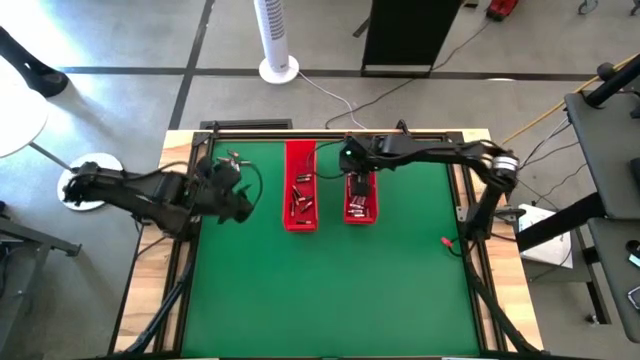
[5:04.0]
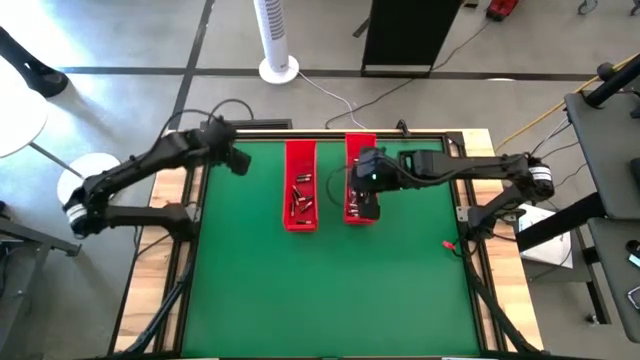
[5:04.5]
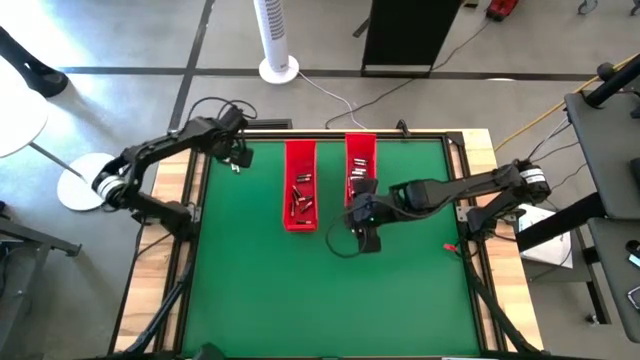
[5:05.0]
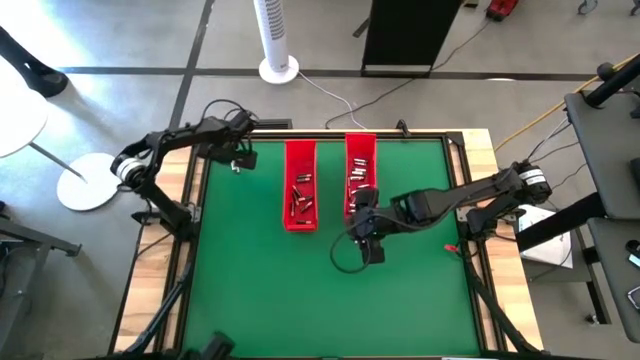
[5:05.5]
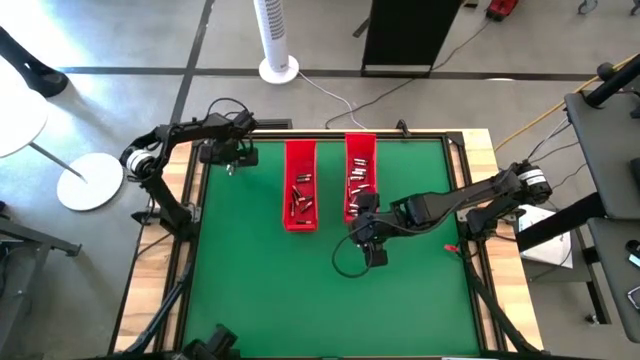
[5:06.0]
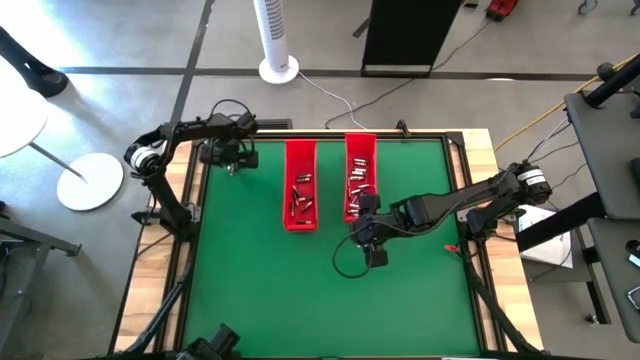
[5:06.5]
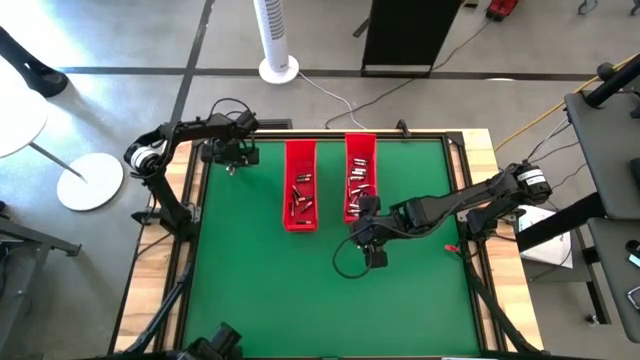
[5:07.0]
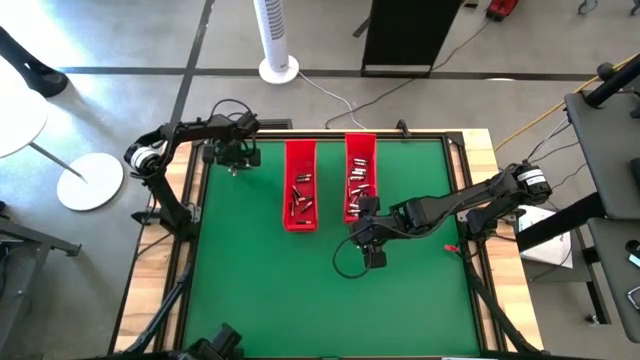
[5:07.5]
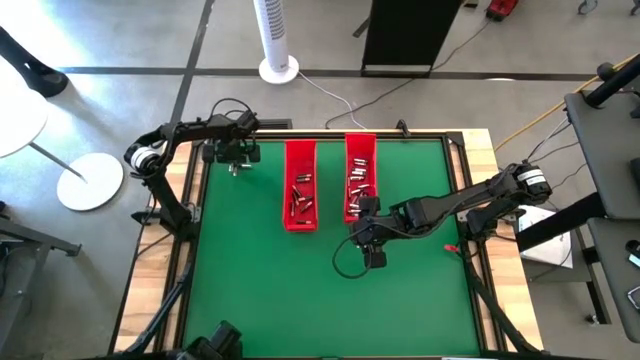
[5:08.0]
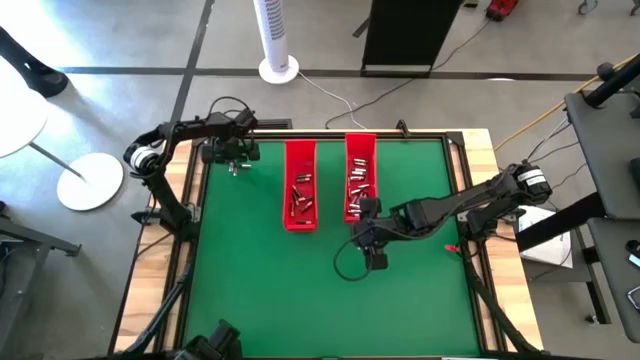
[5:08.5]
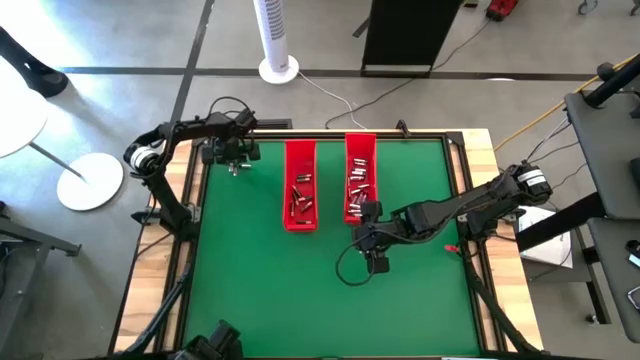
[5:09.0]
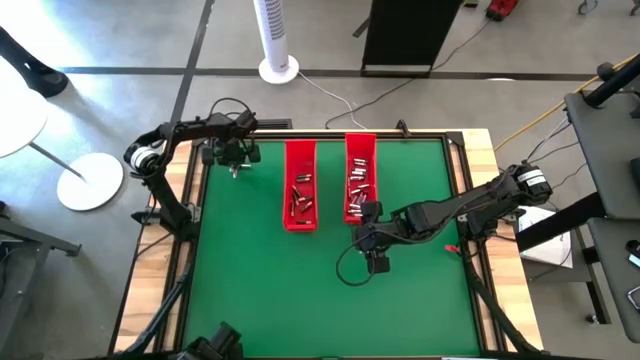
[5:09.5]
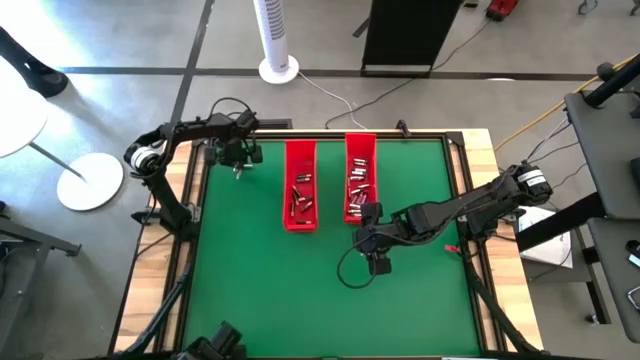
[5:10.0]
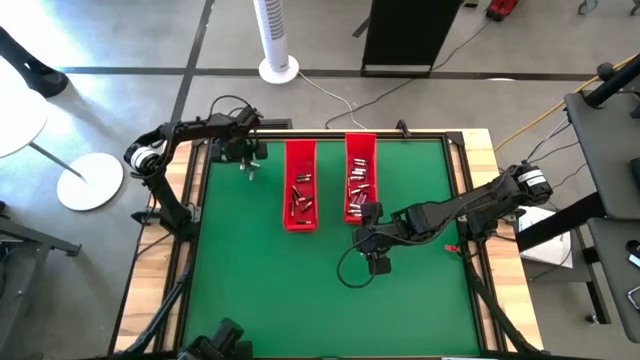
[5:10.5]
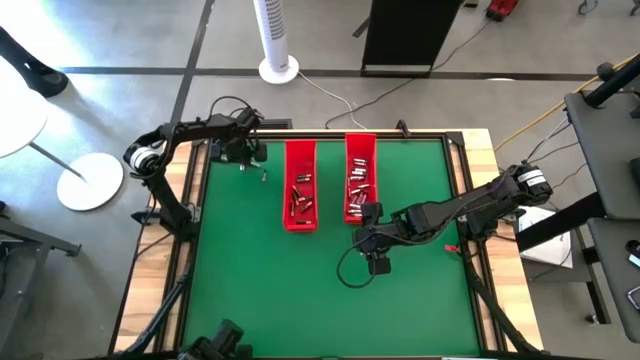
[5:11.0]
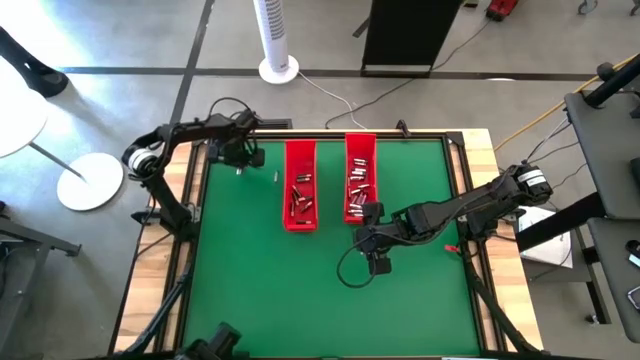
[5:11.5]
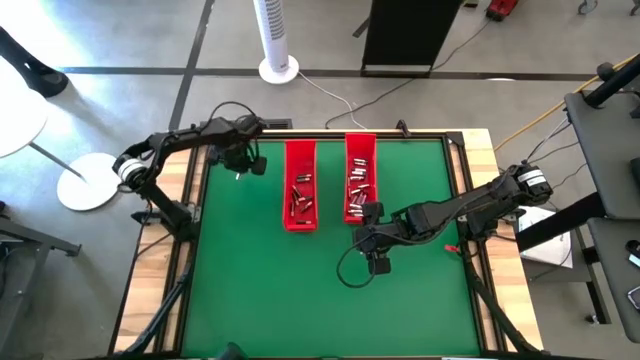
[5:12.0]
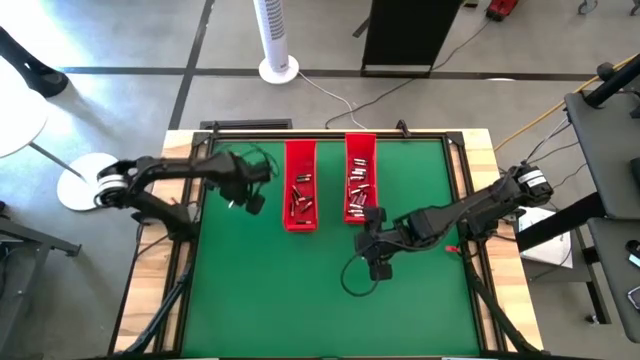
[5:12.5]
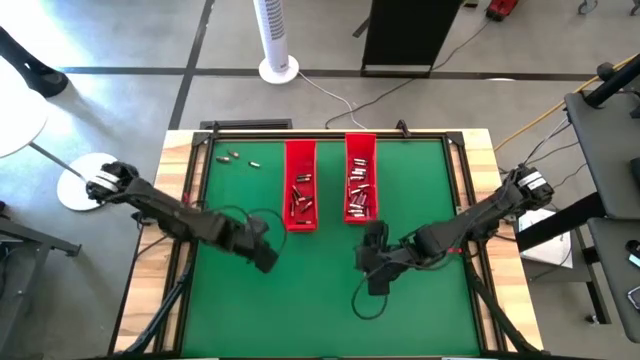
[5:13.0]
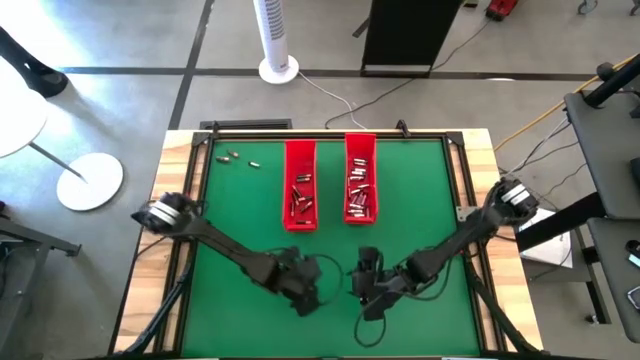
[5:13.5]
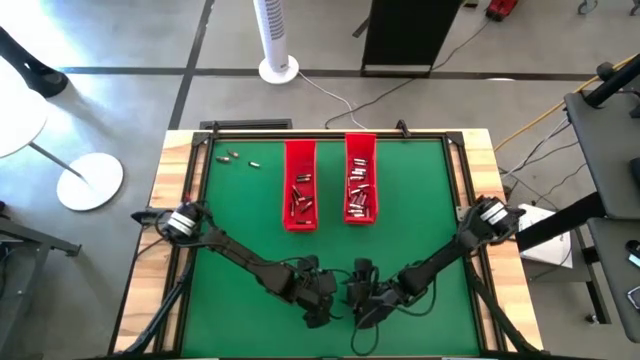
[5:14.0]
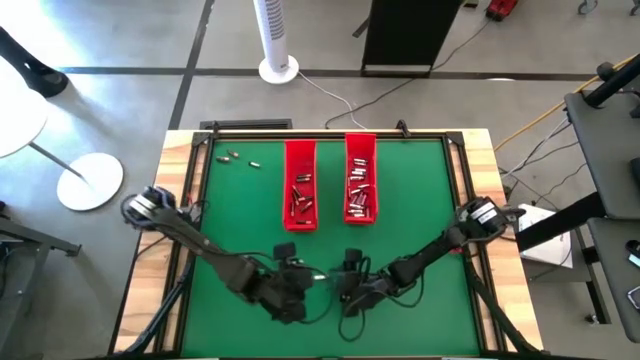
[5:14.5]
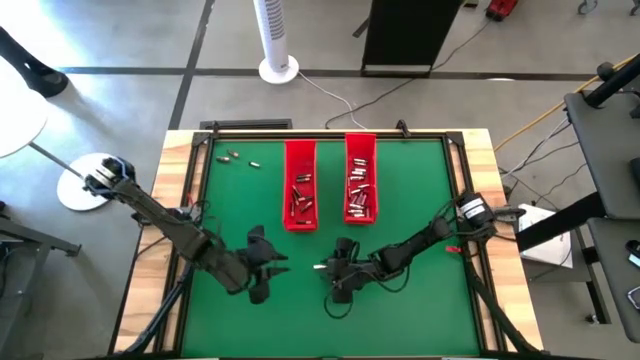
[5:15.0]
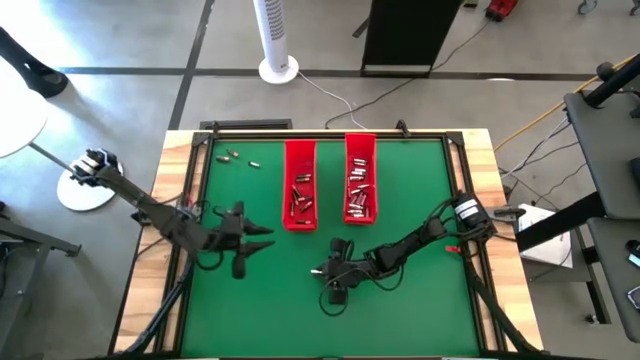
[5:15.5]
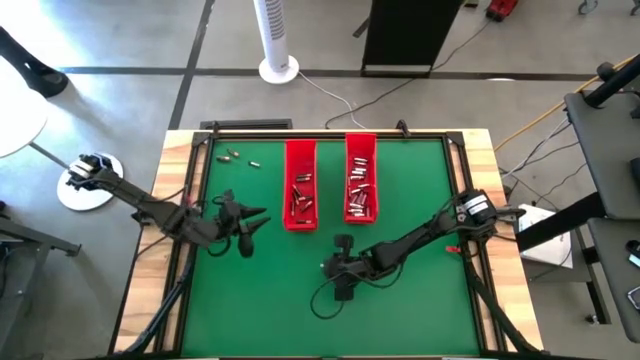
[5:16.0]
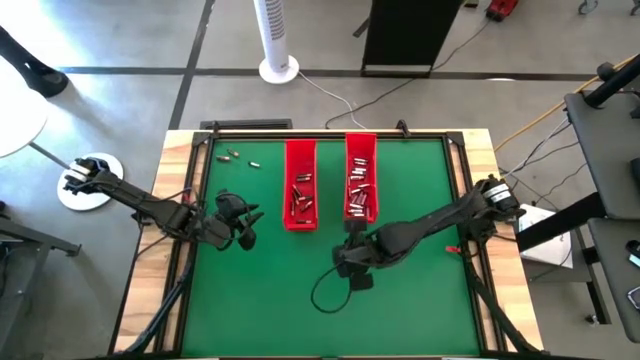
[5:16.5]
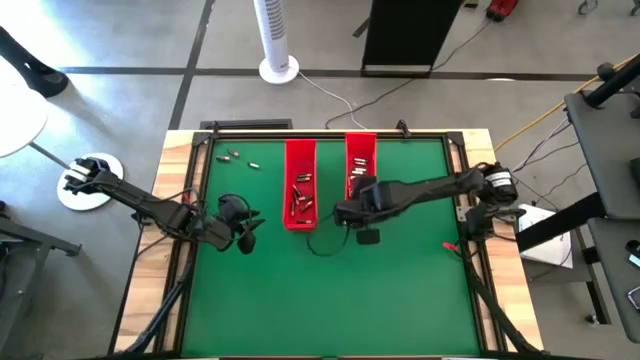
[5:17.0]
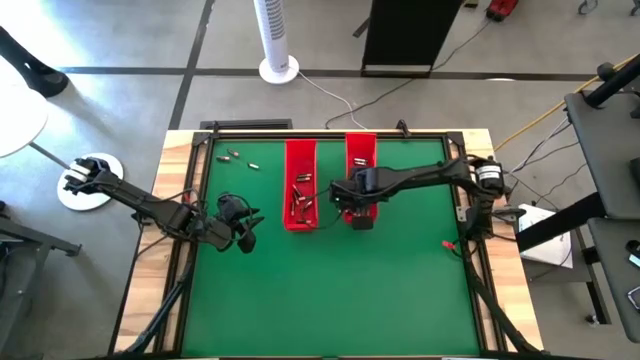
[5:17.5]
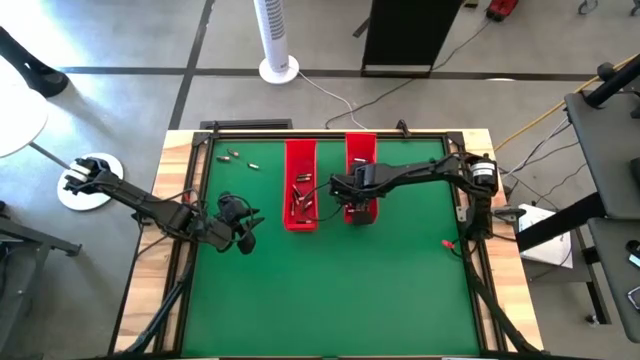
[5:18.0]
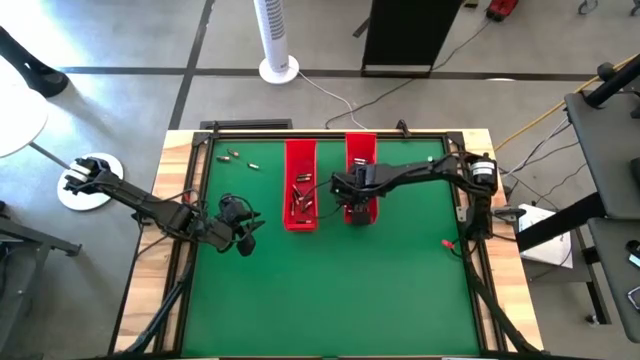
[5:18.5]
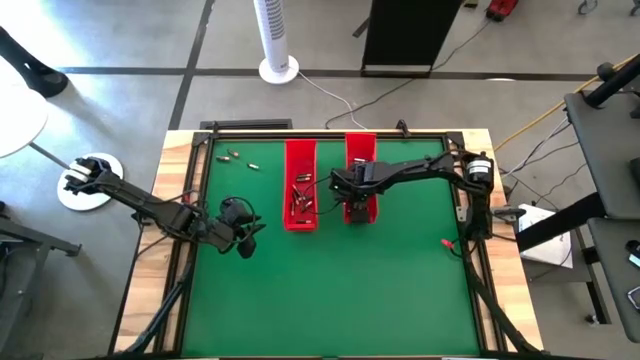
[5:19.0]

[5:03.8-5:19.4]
Task: Sort batteries
Put the silver battery into the right red bin

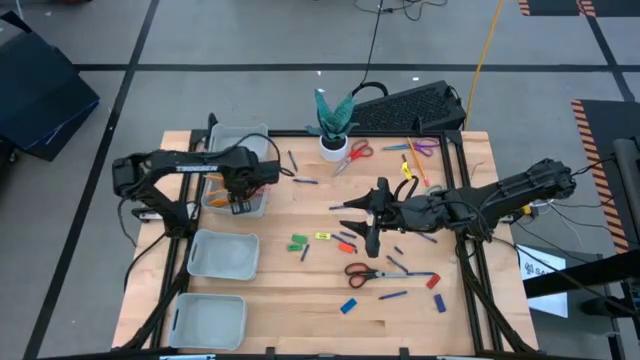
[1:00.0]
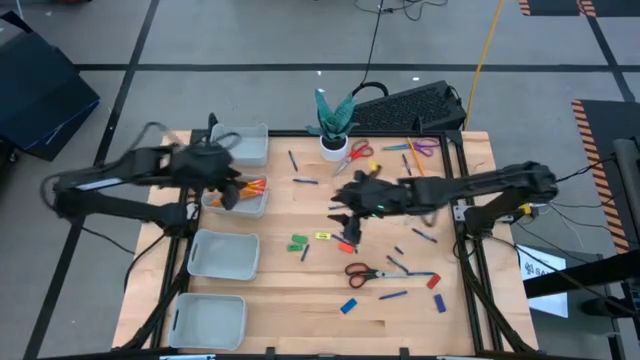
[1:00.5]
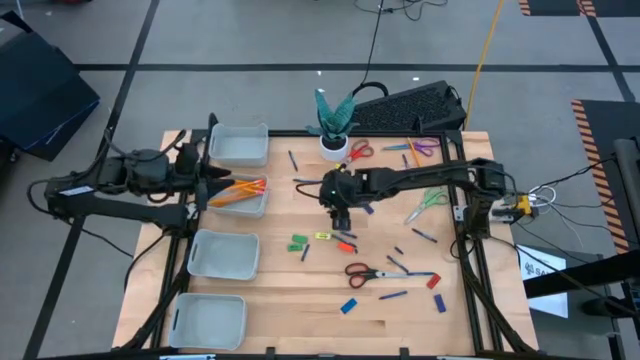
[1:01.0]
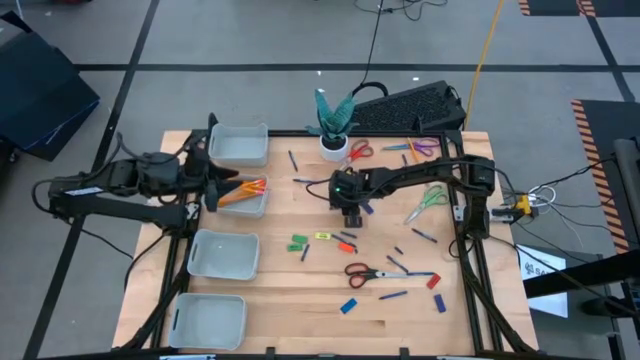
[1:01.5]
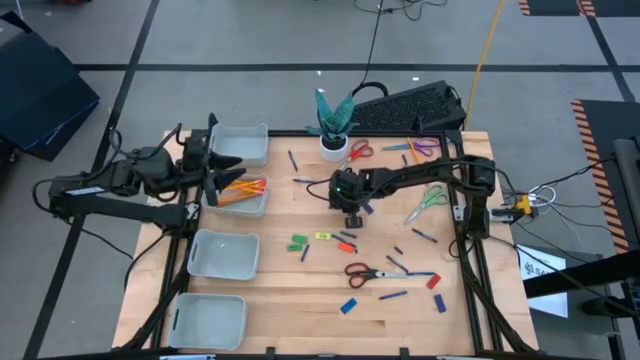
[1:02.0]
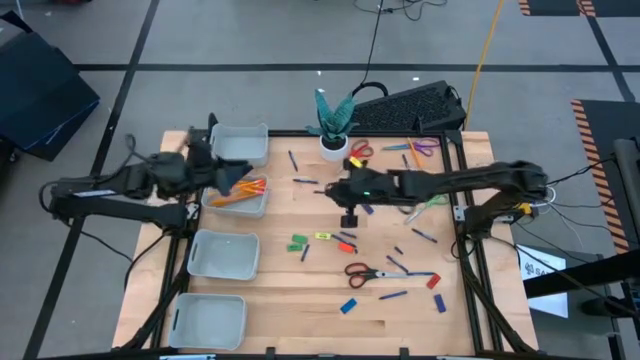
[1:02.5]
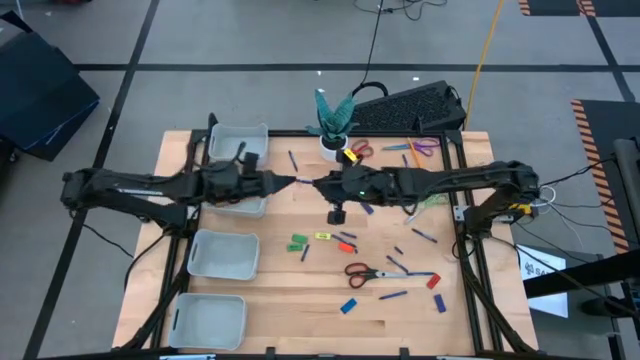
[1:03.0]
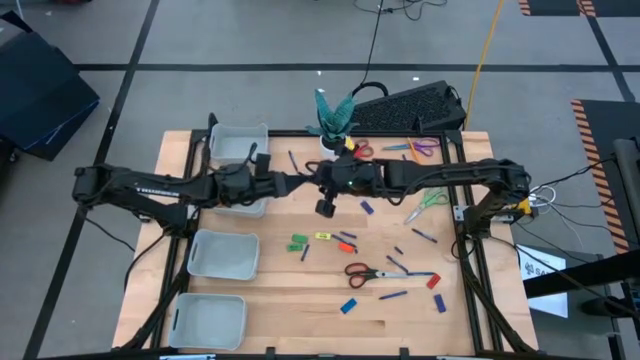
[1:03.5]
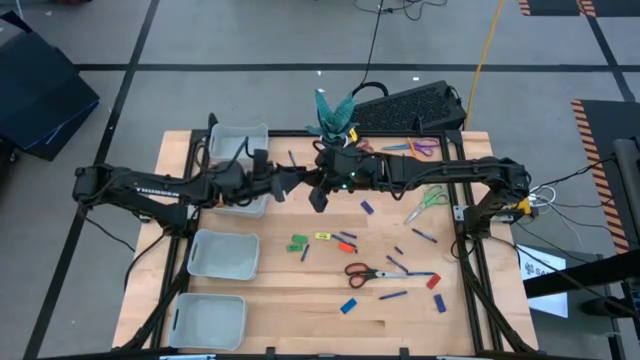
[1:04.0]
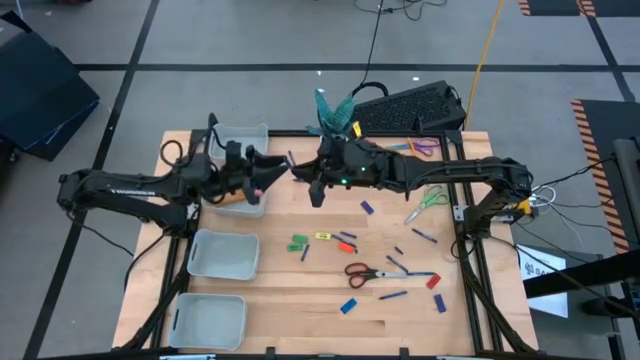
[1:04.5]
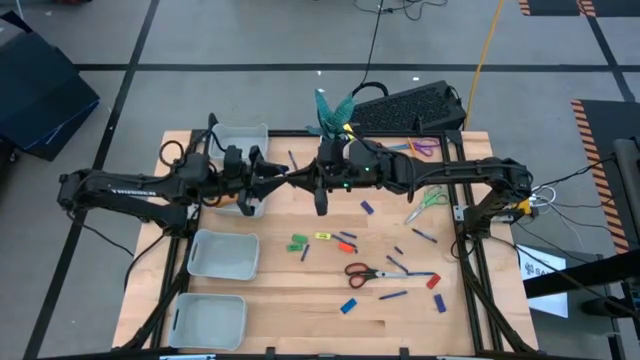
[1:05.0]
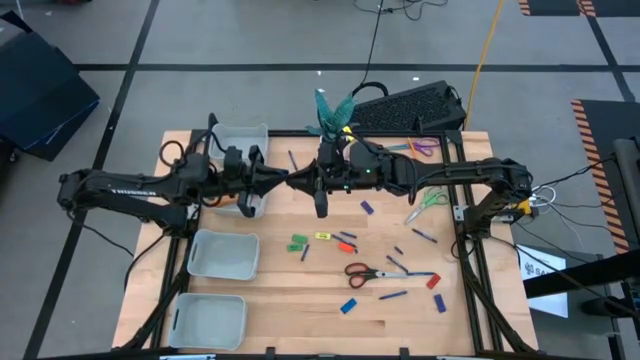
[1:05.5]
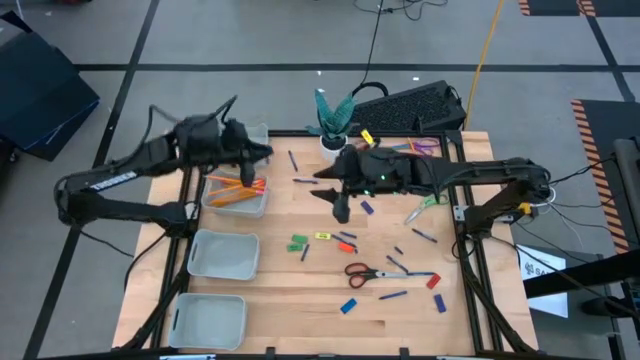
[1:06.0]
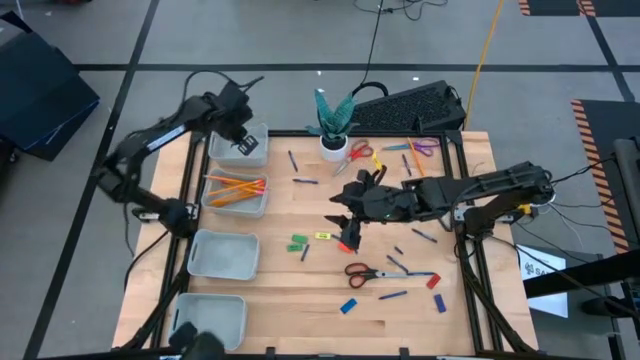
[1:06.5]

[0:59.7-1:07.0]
Task: Sort crayons/erasers/pens/pencils in bins
Put the blue crayon into the top gray bin
